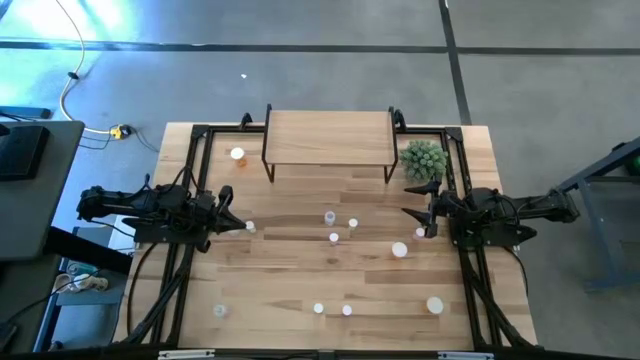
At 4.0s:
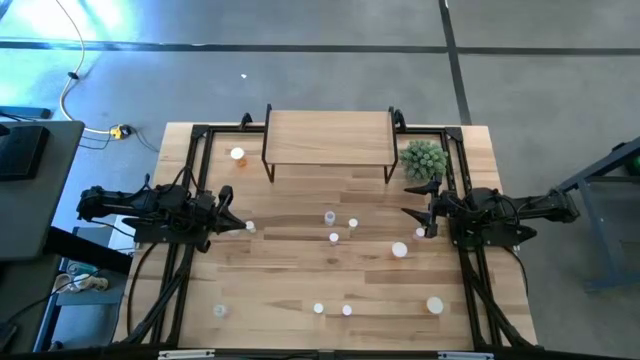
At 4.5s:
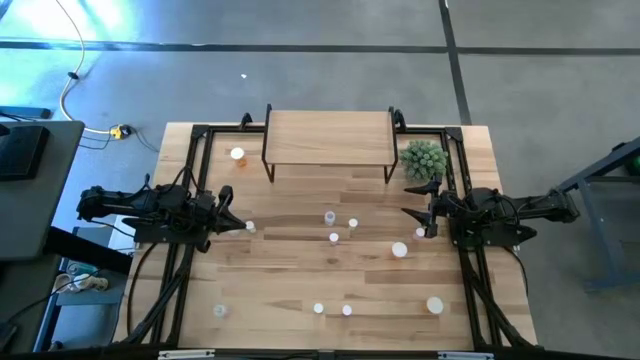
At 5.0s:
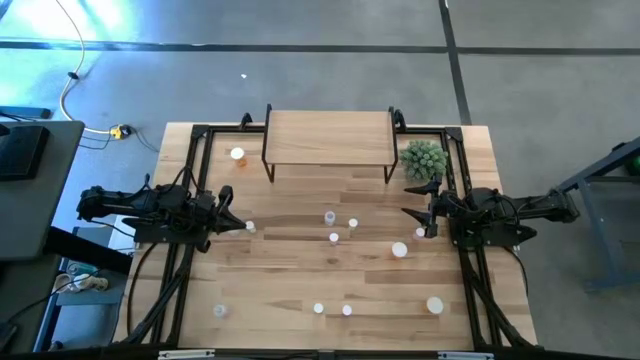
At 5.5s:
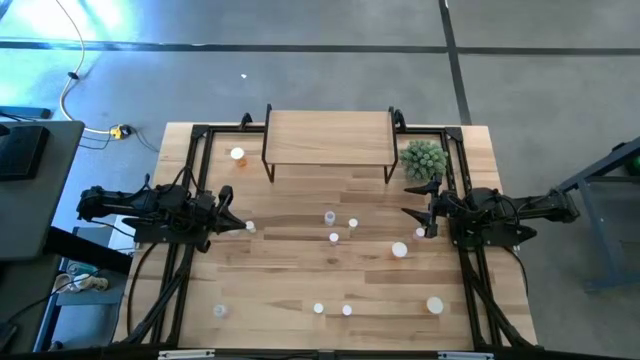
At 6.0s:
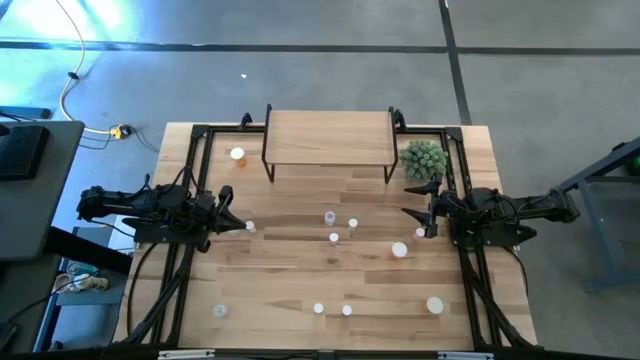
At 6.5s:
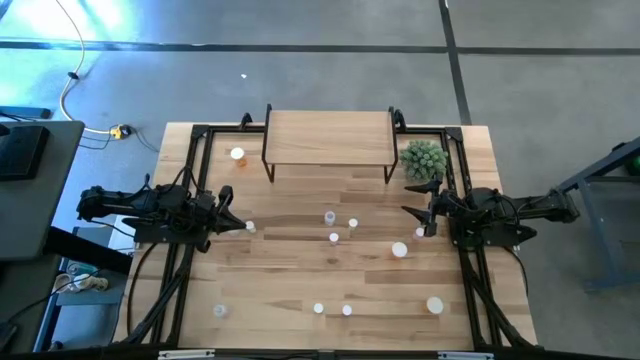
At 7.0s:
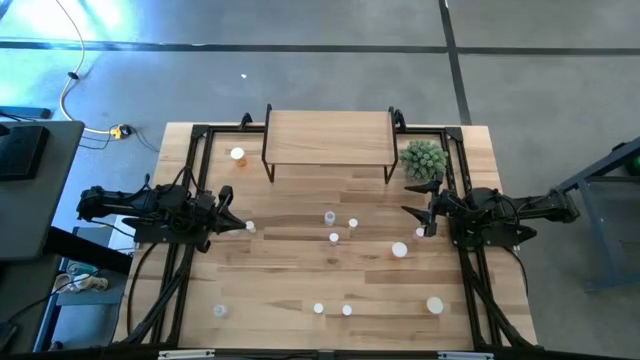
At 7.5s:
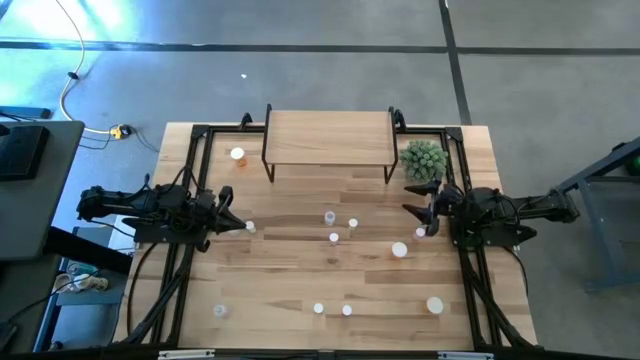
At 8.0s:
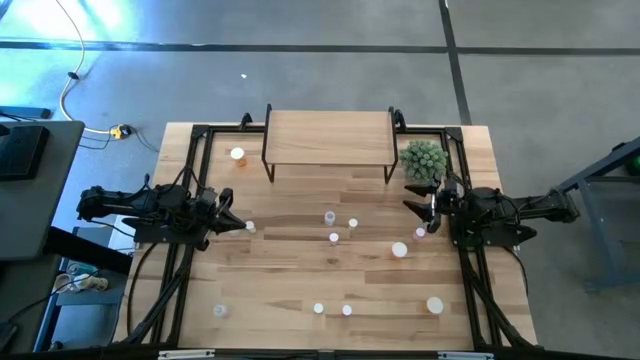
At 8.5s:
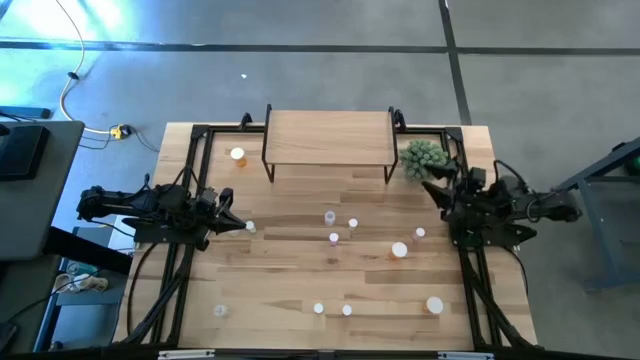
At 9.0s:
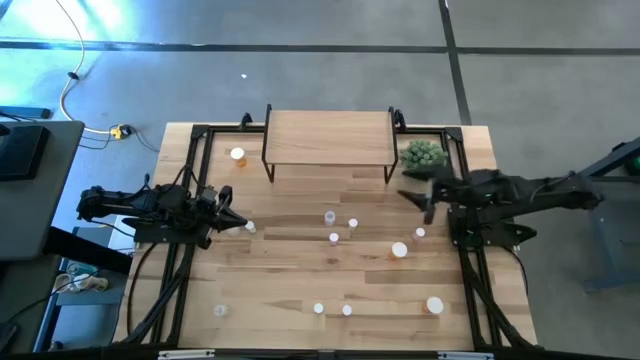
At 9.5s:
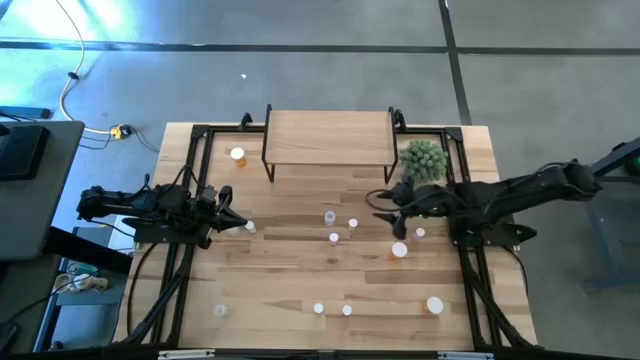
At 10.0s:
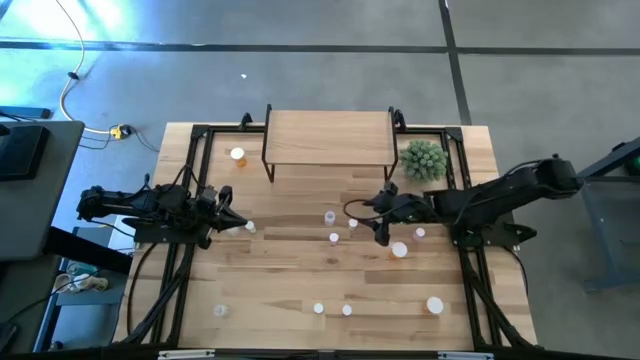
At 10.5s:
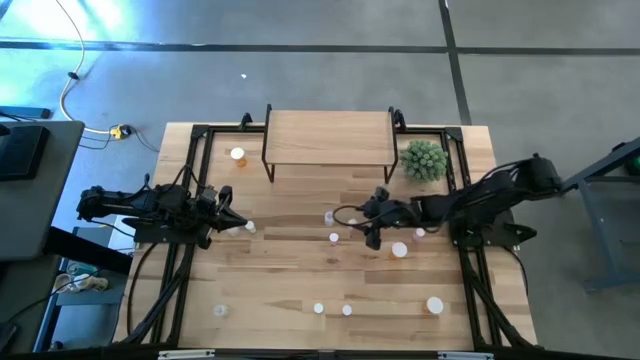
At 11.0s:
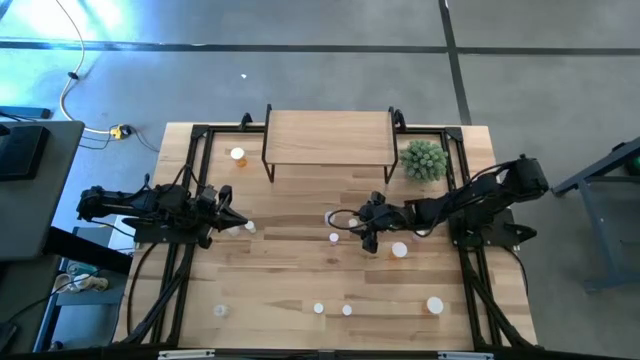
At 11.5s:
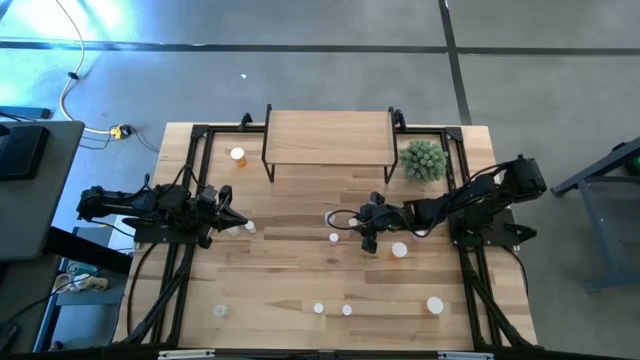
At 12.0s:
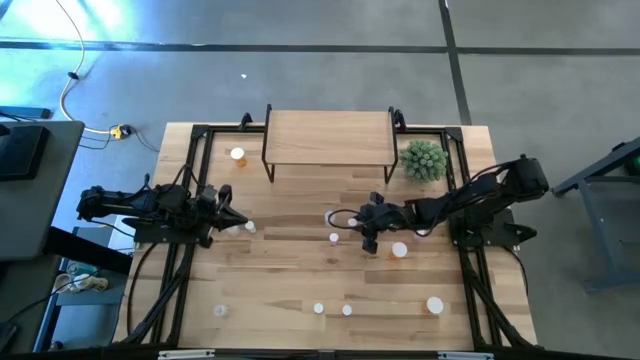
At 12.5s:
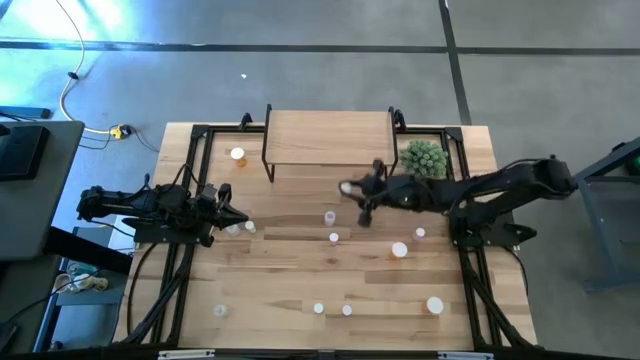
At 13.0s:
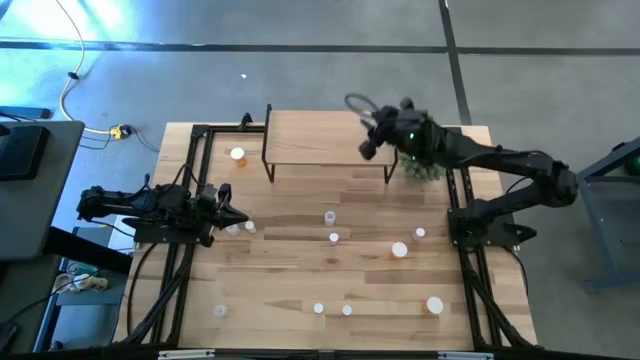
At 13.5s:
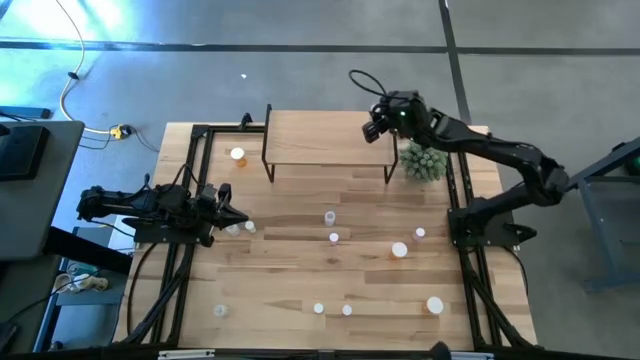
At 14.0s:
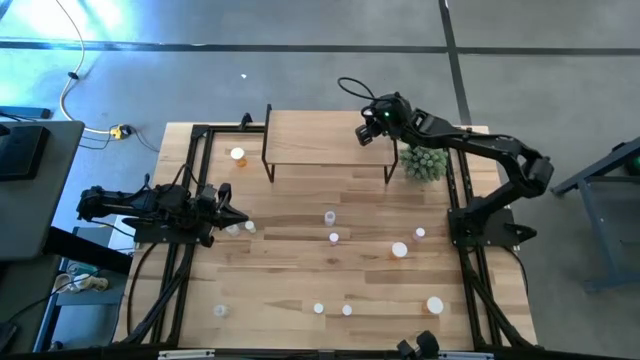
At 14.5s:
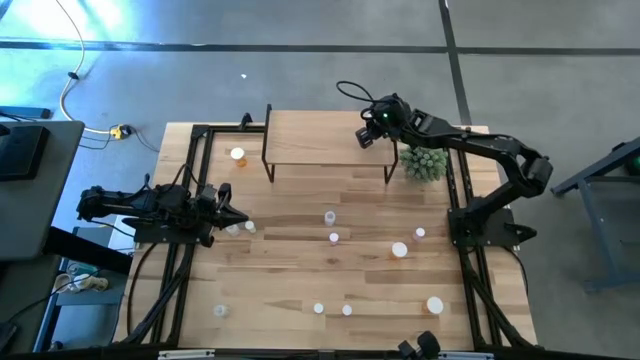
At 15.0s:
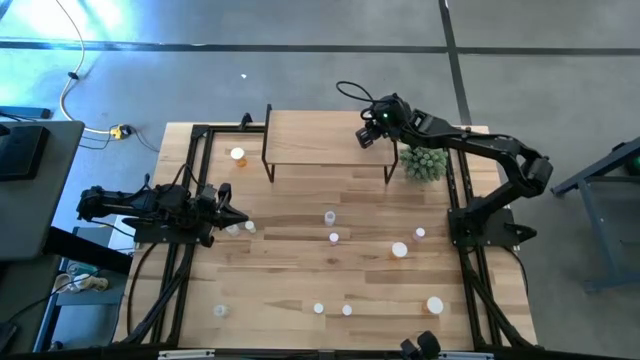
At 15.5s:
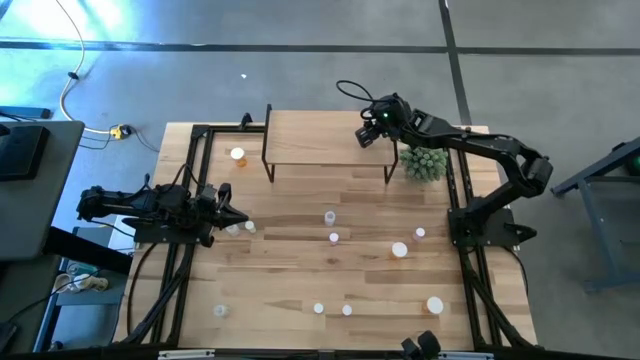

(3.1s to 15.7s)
Task: Pick and place medicine bottles onto shelf by color
Put the top right yellow pill bottle on the shelf

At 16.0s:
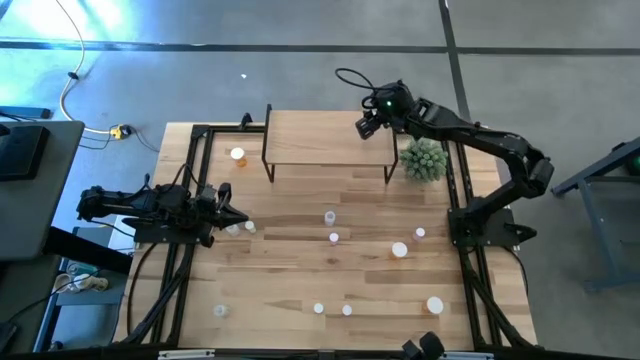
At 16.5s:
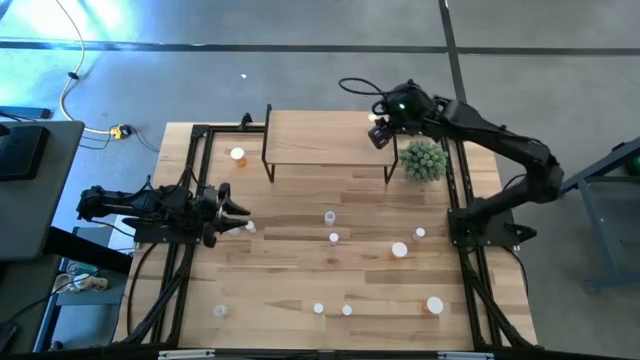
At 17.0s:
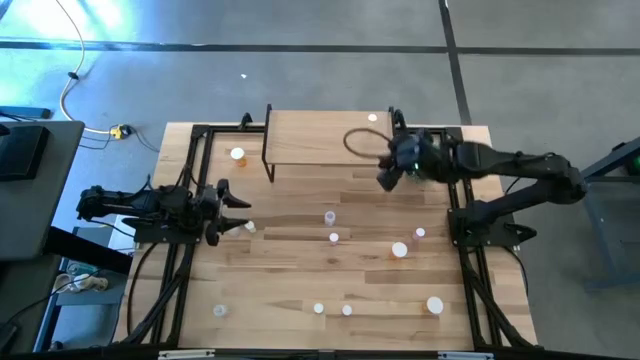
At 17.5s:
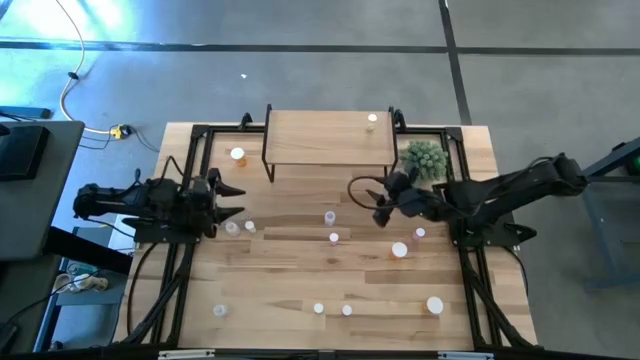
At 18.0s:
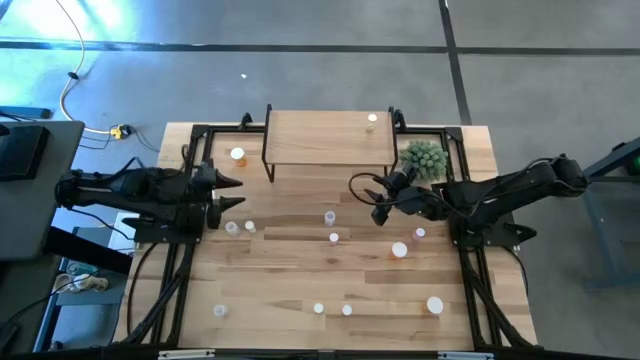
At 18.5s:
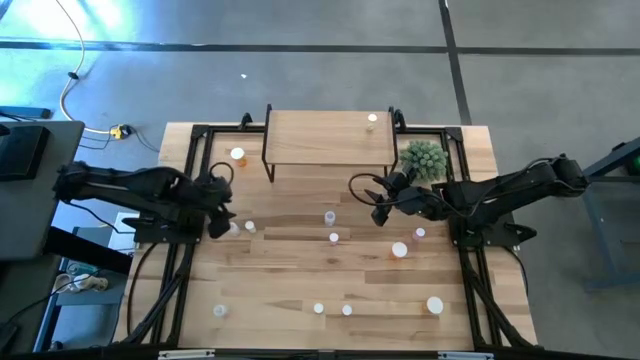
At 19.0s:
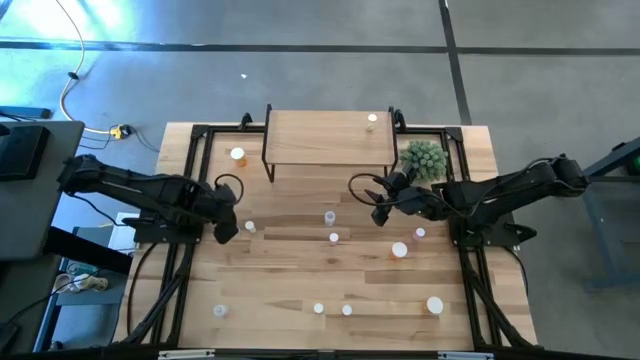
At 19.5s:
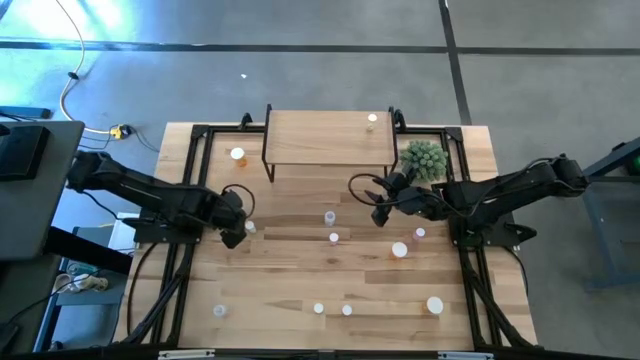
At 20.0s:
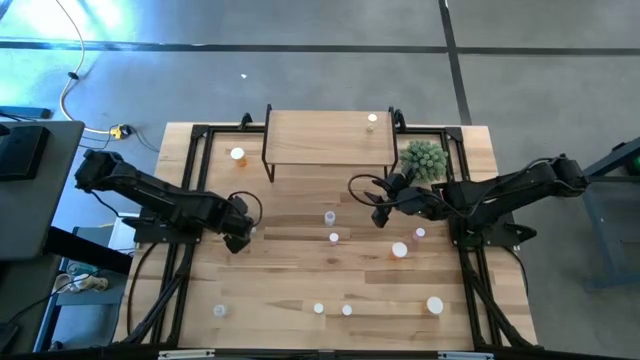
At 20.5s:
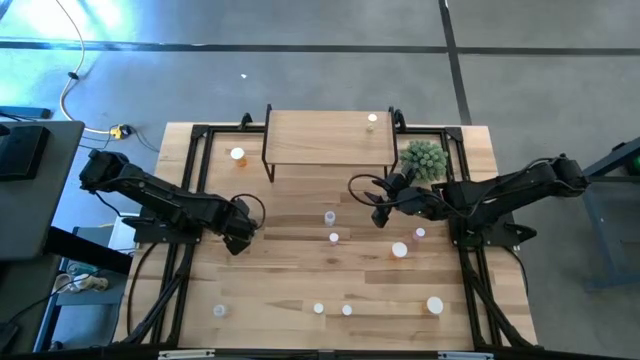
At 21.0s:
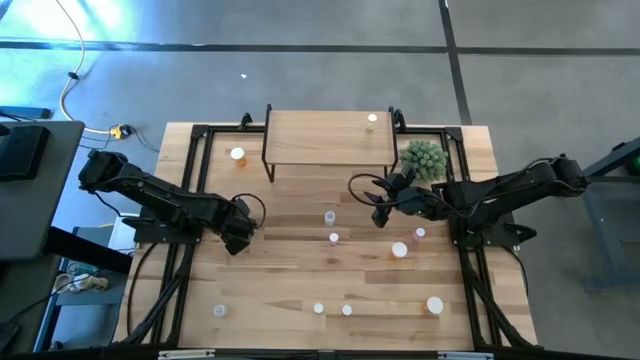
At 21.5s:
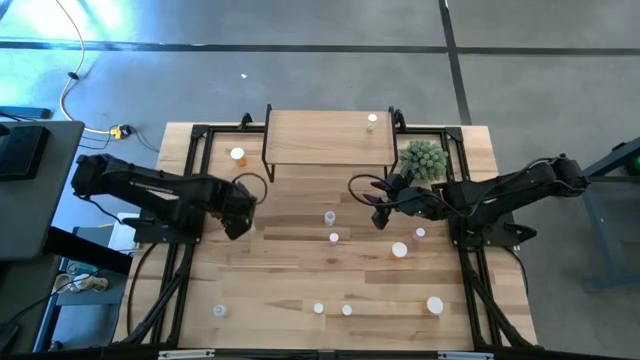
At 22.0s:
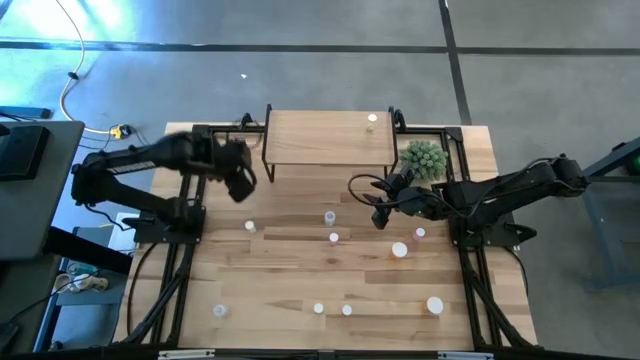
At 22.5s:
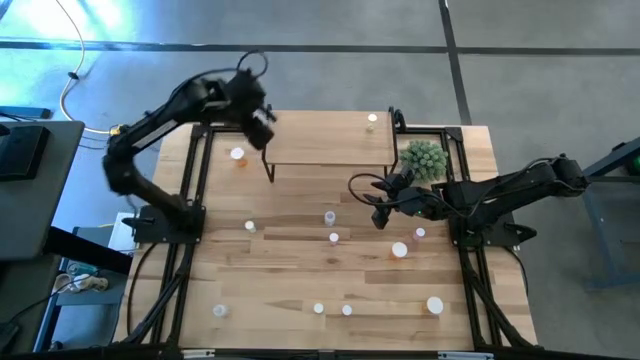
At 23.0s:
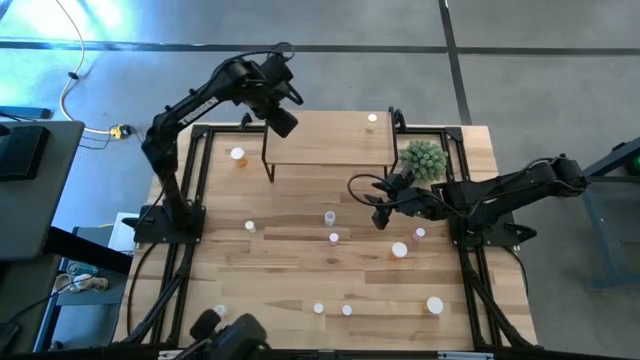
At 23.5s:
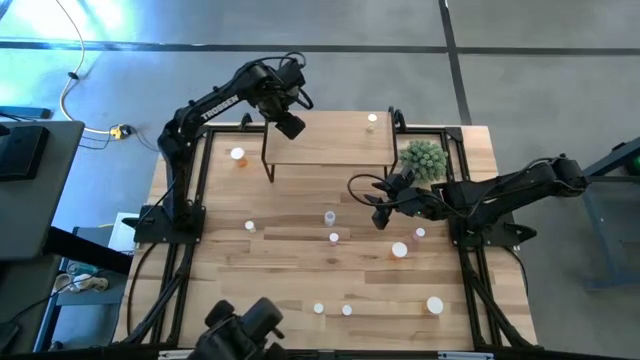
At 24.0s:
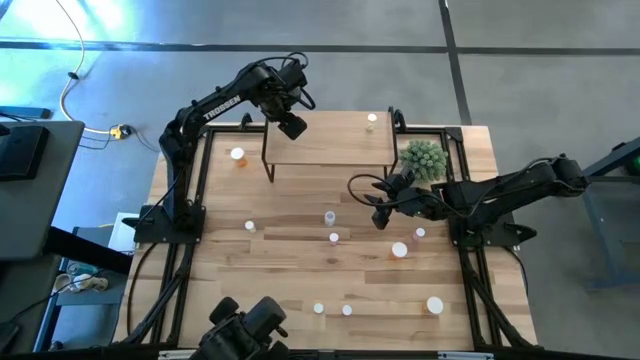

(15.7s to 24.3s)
Put the top left transparent pill bottle on the shelf
